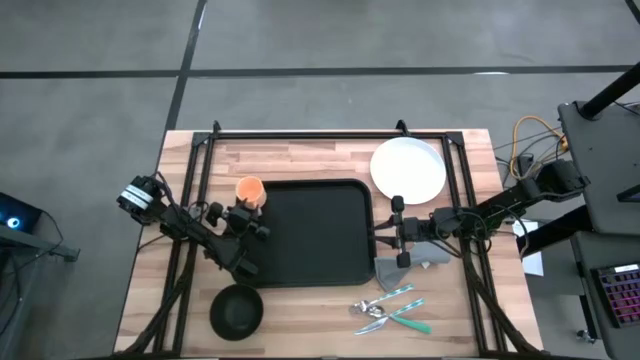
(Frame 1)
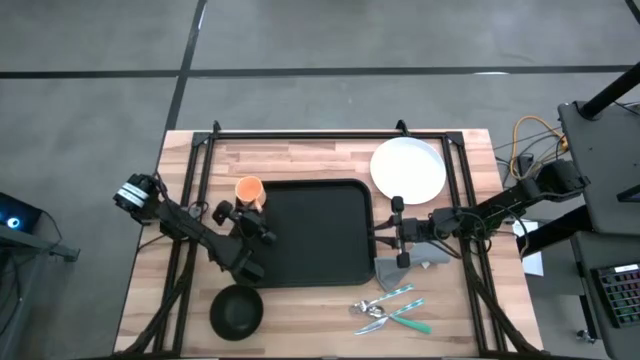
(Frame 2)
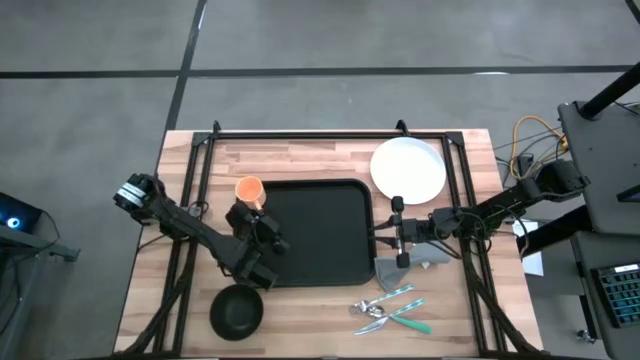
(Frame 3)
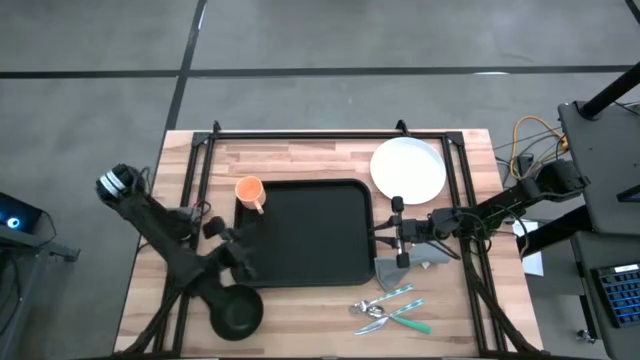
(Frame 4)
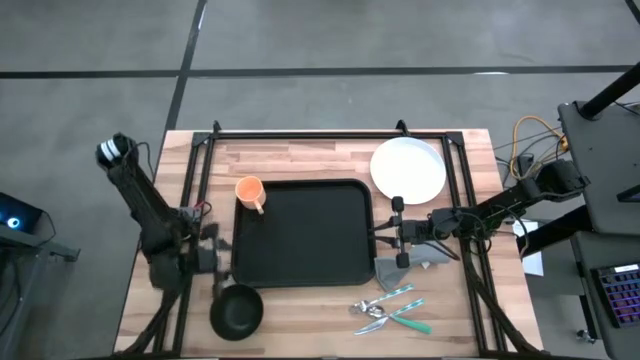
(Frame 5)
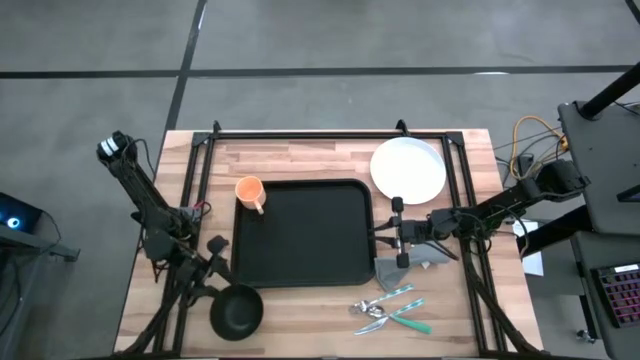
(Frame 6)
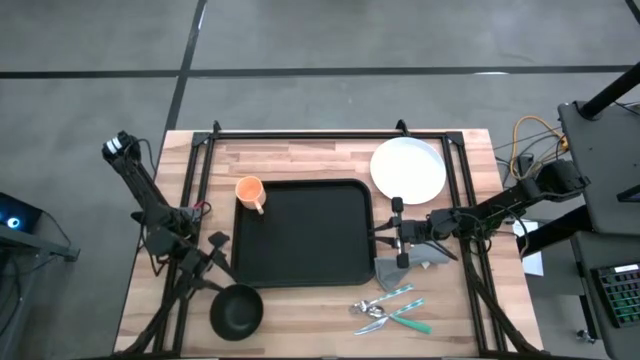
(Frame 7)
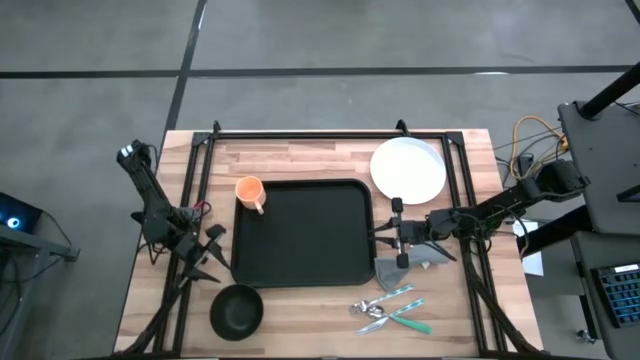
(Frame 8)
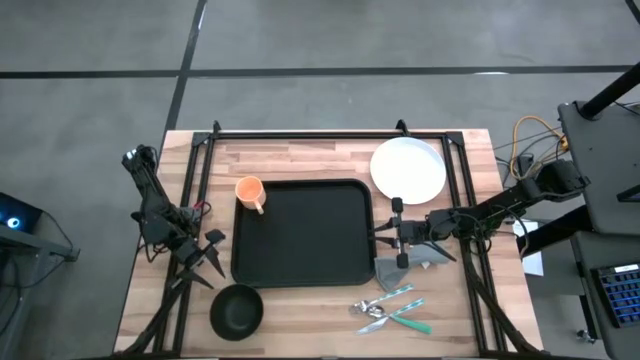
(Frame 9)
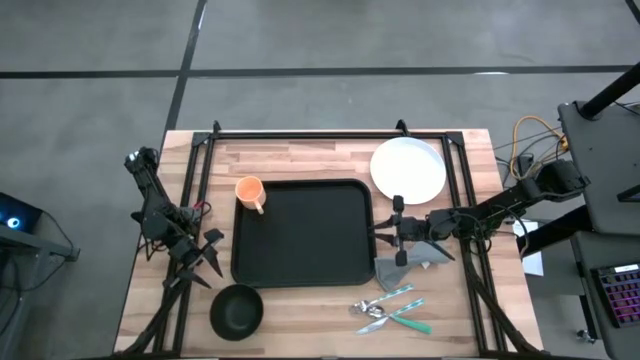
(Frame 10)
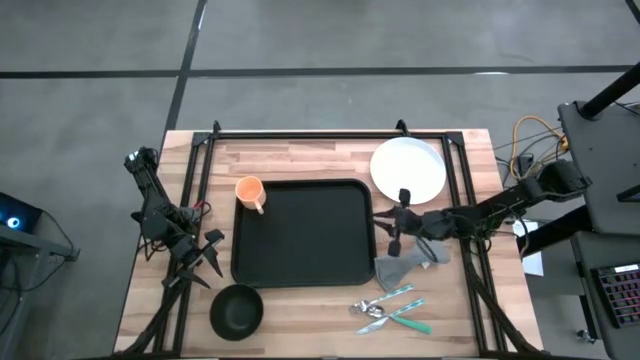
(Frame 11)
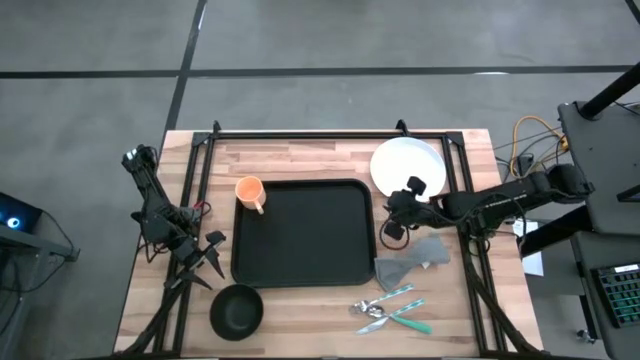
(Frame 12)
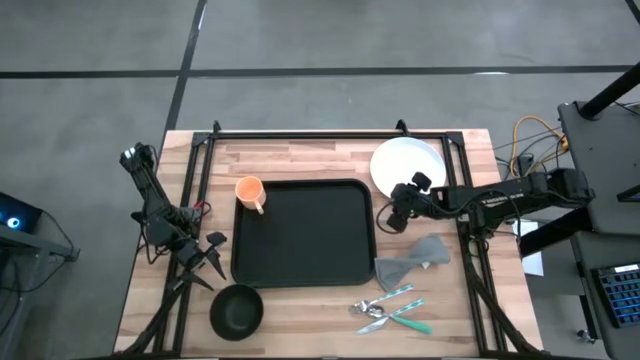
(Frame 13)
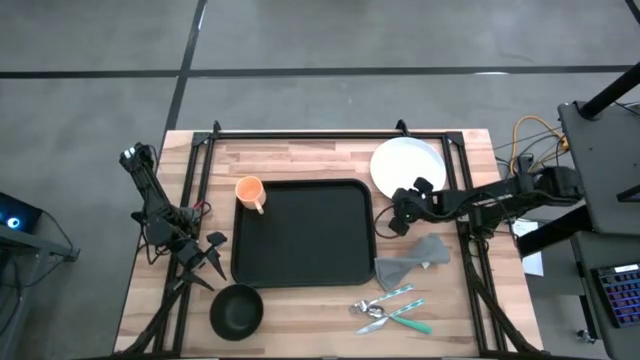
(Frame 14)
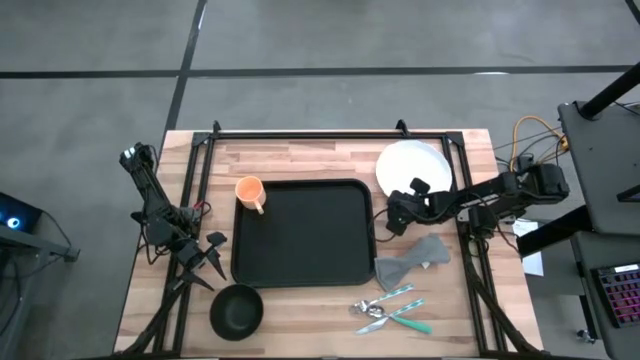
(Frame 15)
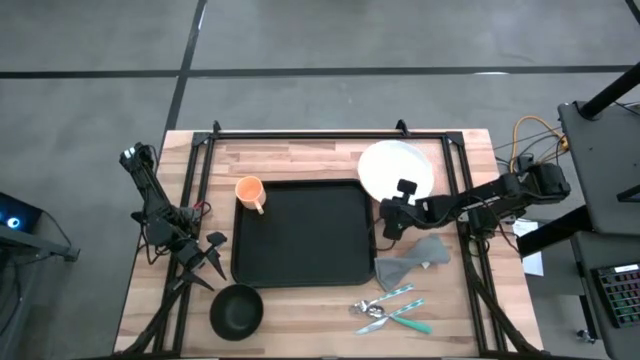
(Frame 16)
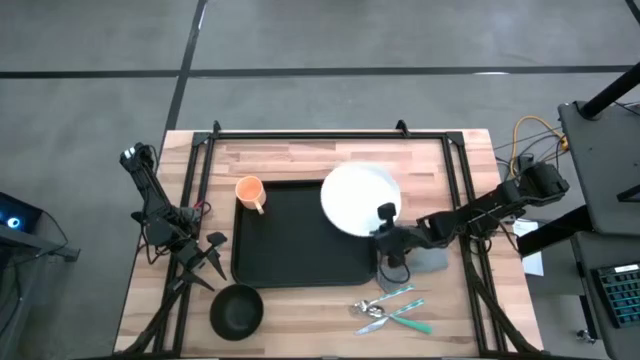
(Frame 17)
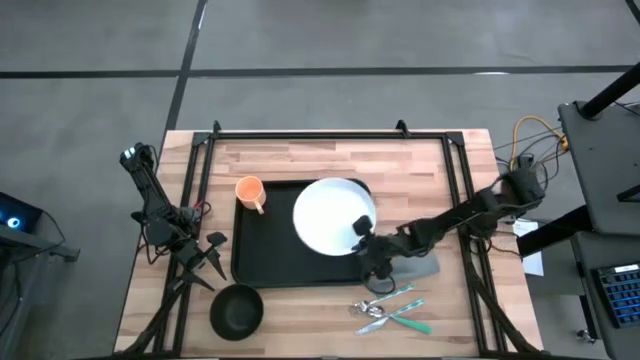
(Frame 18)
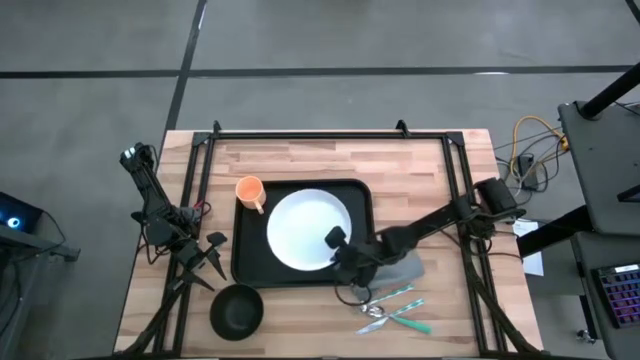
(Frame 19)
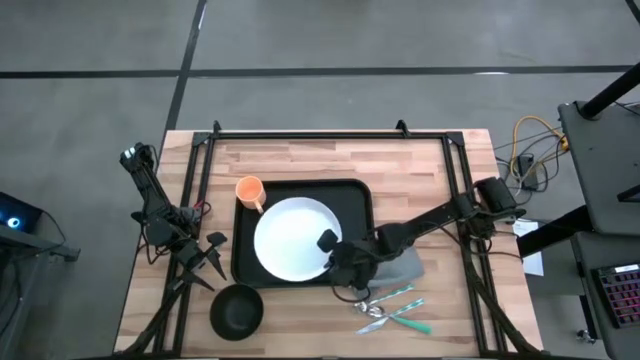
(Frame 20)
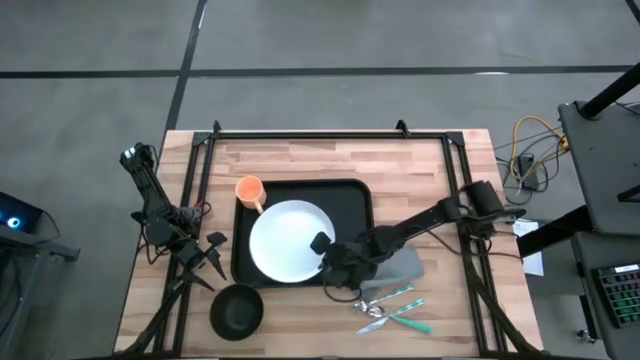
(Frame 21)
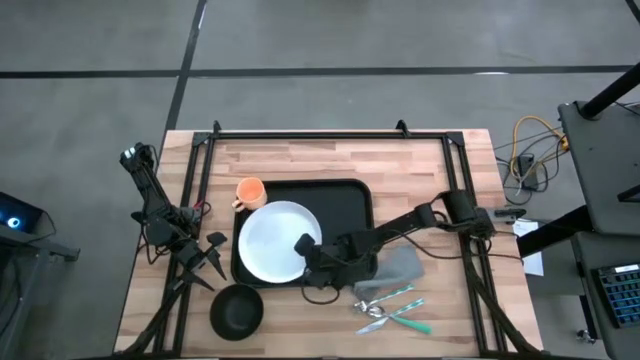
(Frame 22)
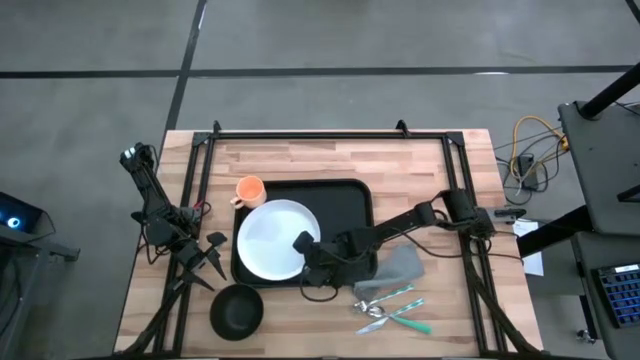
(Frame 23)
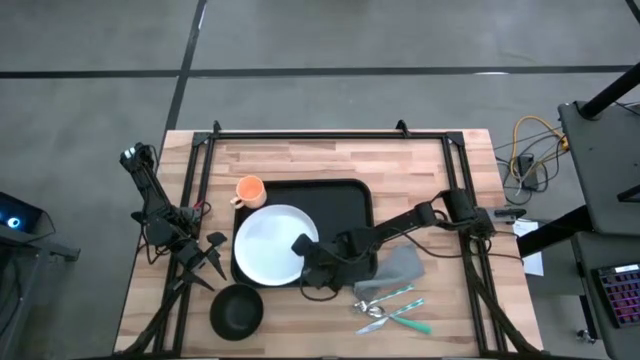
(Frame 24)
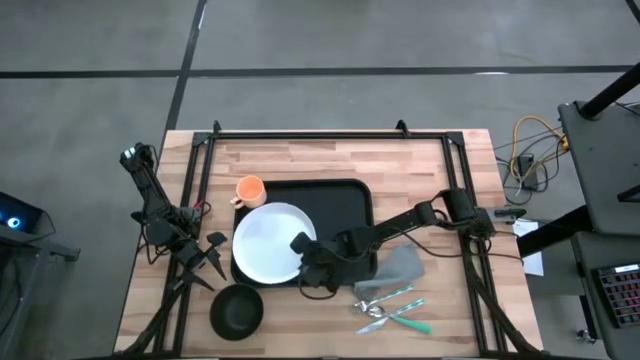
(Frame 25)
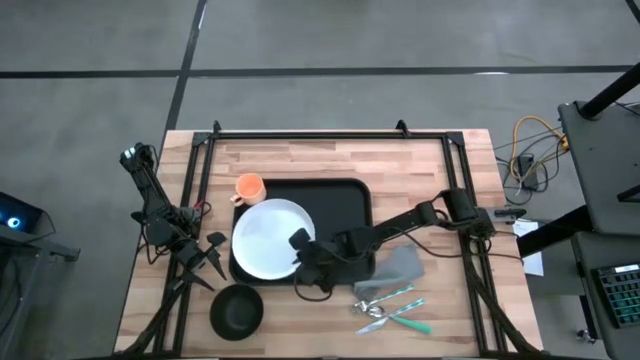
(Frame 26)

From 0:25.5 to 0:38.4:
Task: Set up tray
Put the white plate below the orange mug on the black serving tray

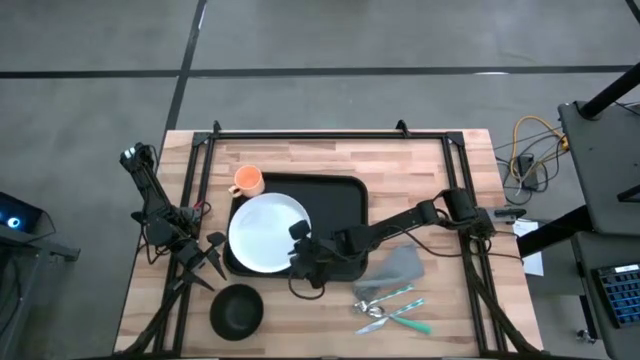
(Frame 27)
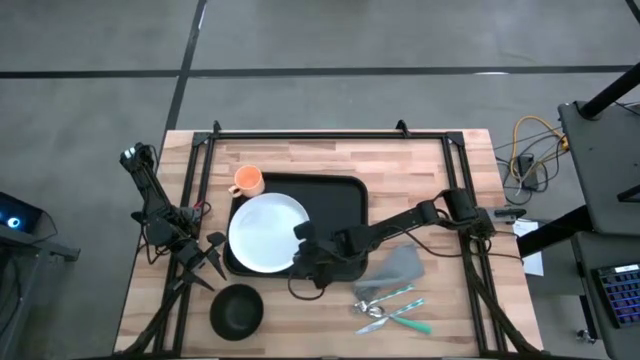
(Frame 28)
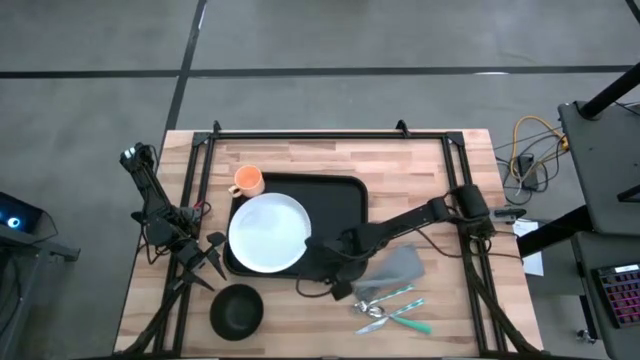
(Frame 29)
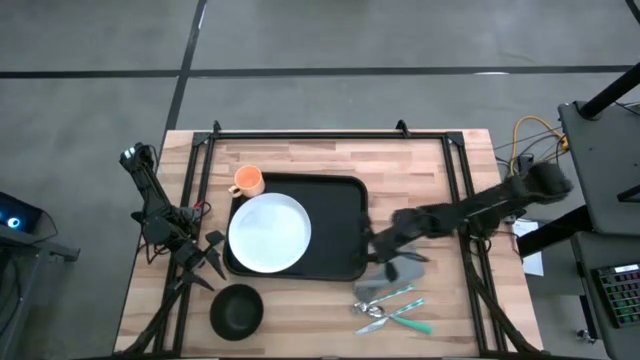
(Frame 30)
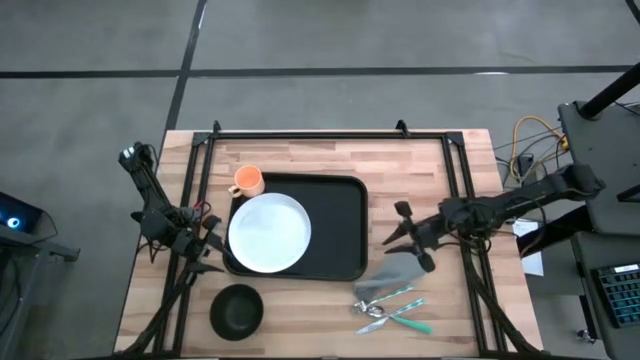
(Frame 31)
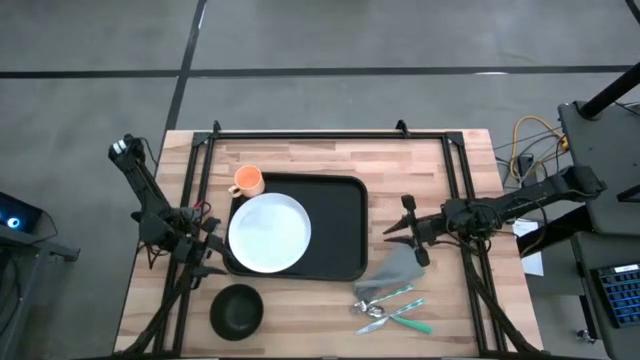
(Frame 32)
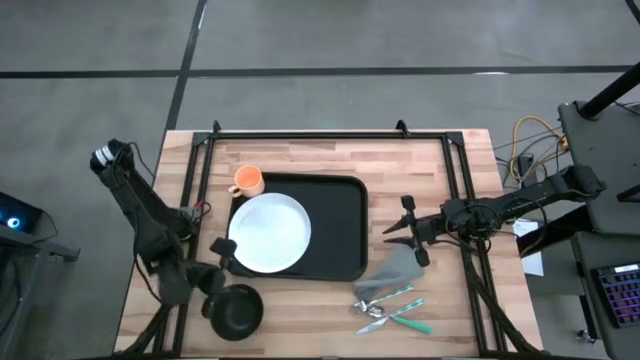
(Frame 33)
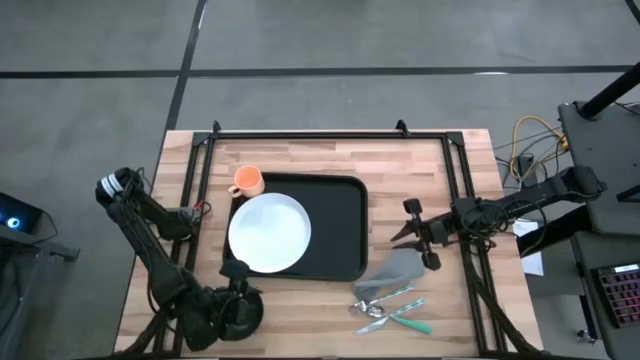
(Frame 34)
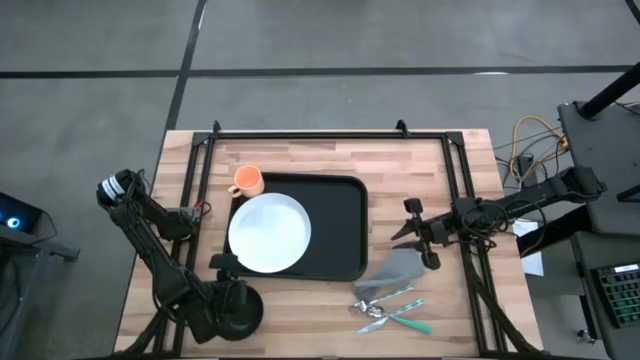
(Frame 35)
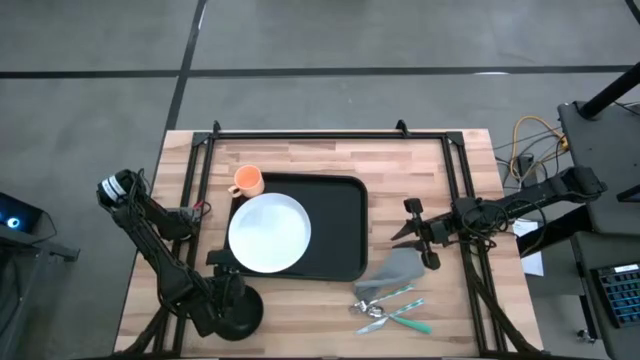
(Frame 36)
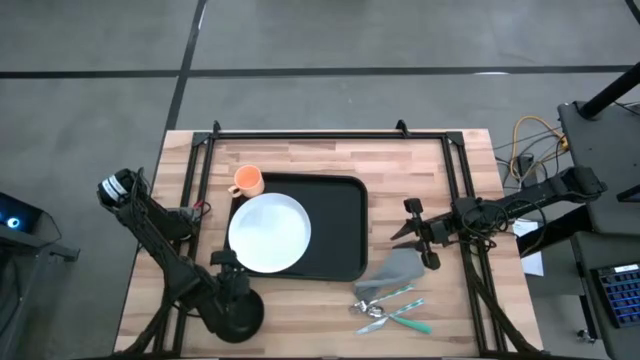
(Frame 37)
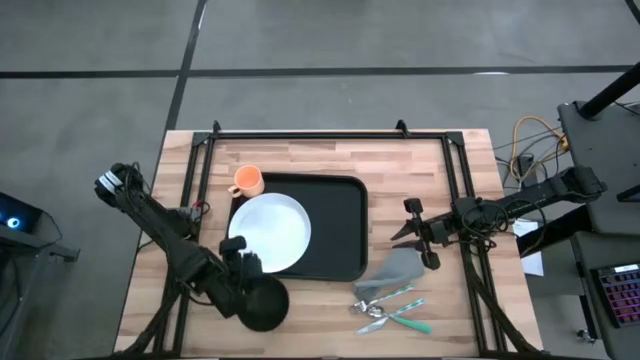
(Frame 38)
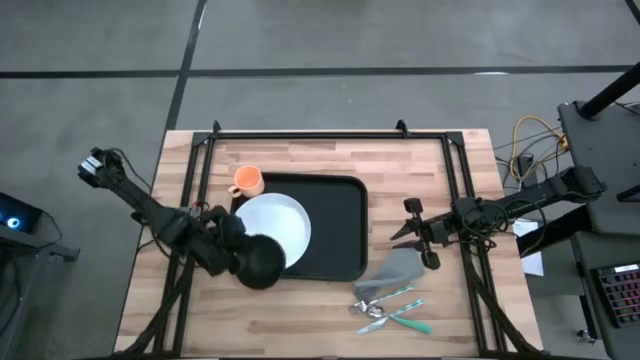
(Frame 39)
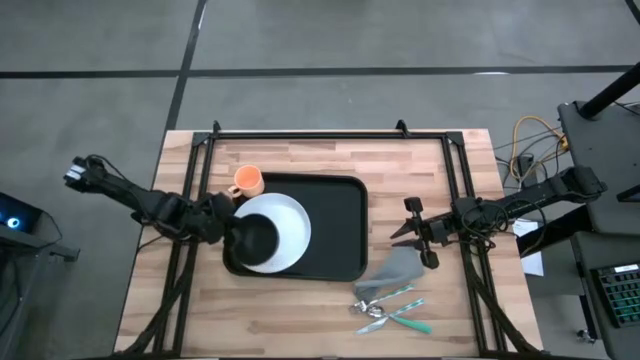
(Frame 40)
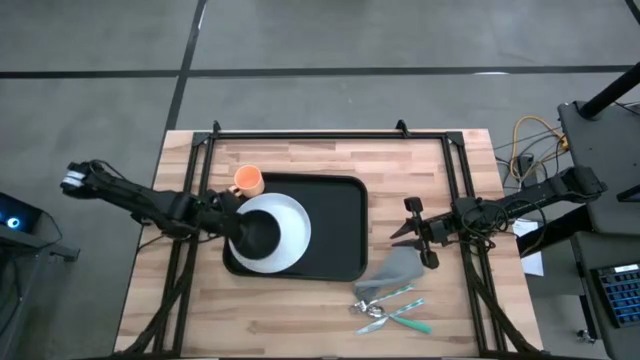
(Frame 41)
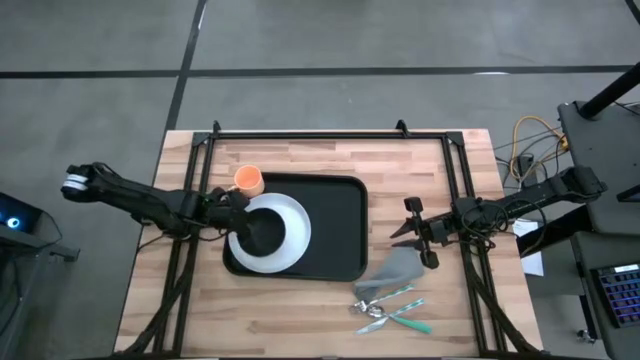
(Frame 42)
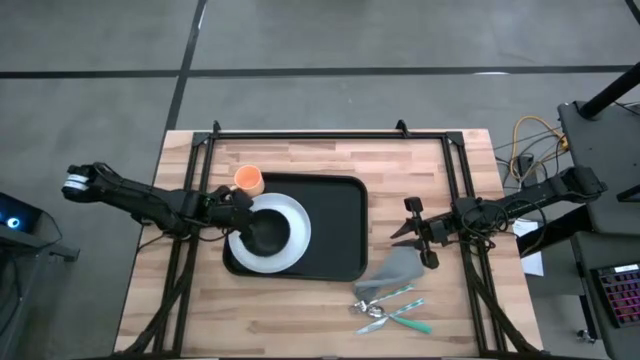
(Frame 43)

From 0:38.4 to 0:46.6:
Put the black bowl on the white plate on the black serving tray

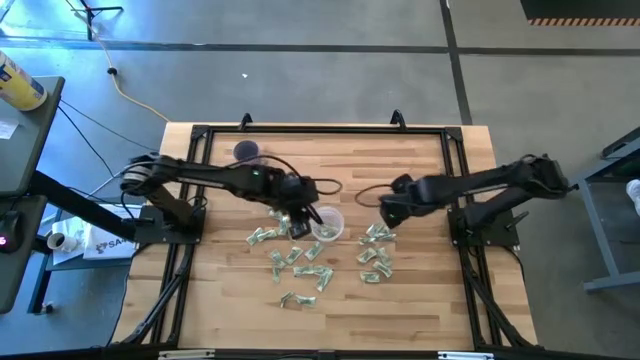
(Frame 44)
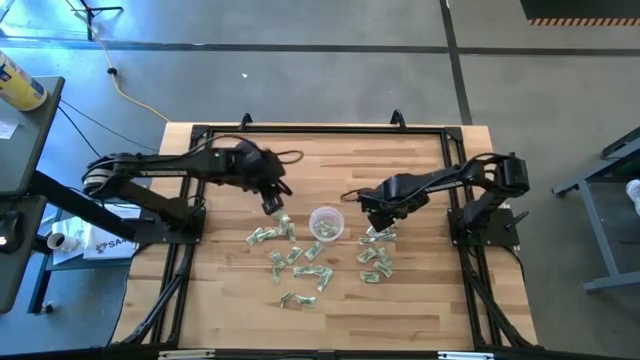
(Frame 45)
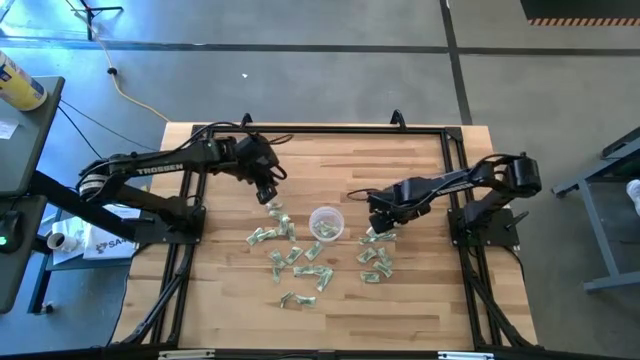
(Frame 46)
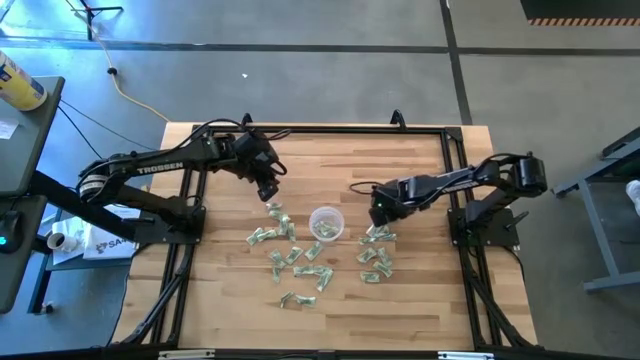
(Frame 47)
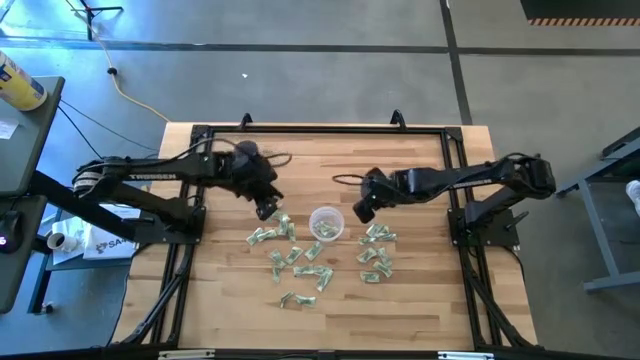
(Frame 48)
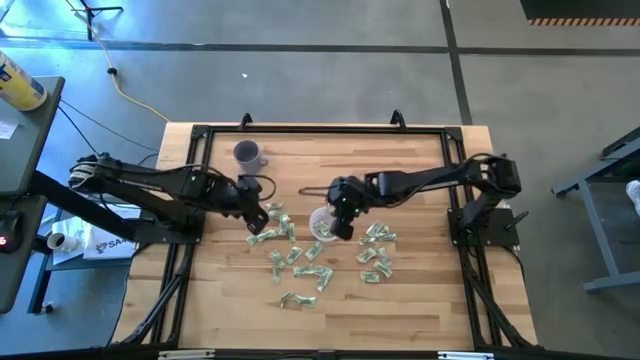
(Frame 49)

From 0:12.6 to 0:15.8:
Task: Pick and place Stevia / Truvia into bins
Put the stevia packet into the transparent container
